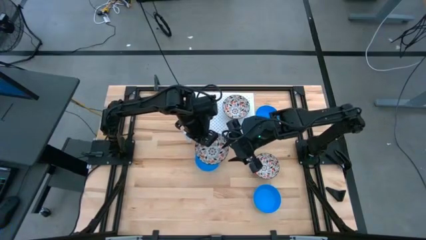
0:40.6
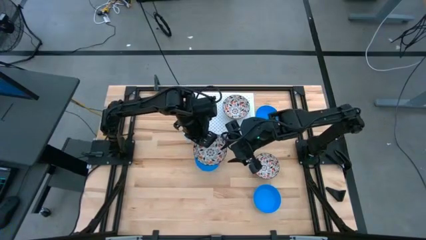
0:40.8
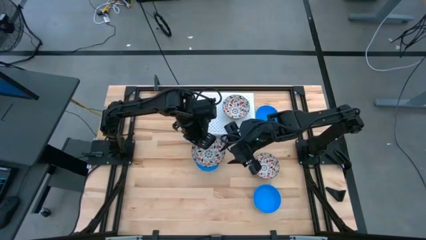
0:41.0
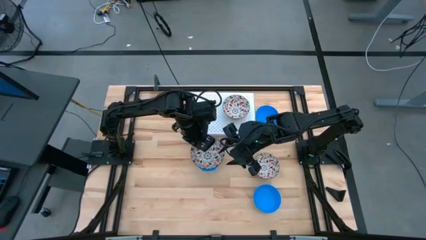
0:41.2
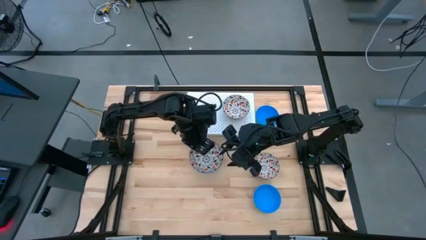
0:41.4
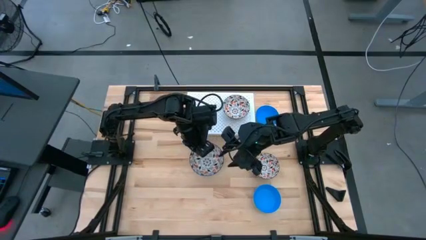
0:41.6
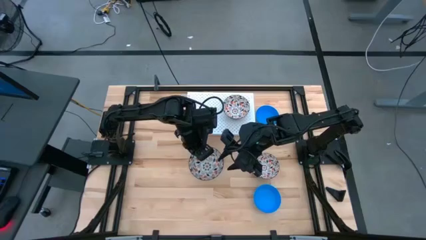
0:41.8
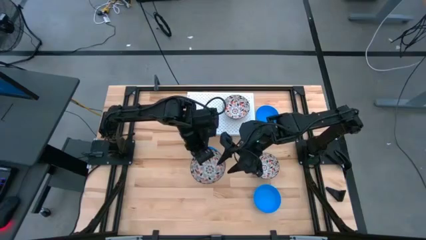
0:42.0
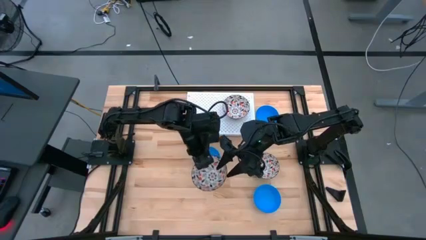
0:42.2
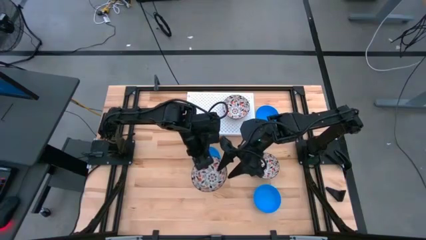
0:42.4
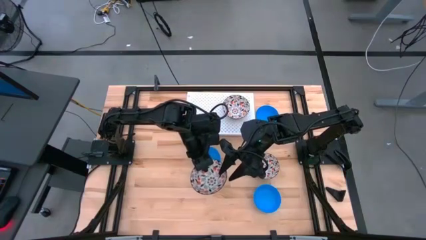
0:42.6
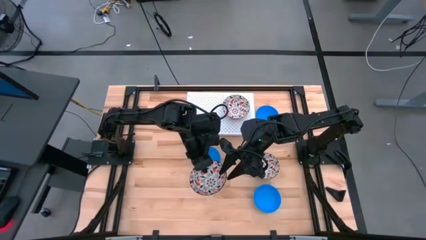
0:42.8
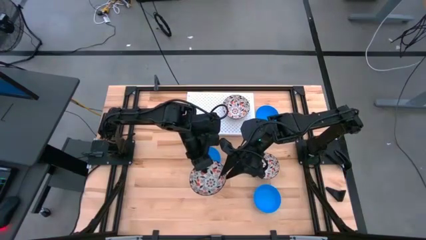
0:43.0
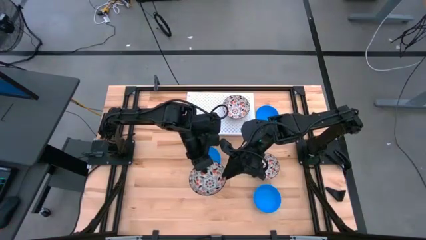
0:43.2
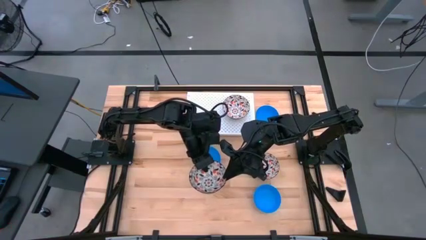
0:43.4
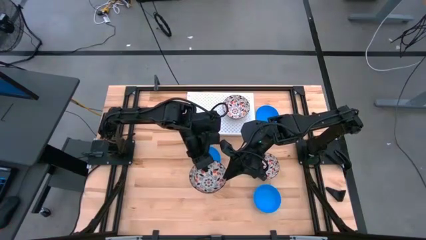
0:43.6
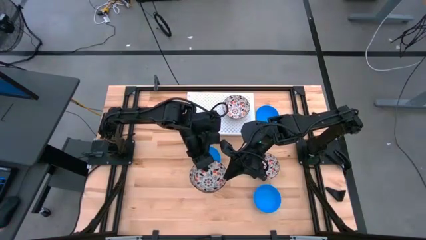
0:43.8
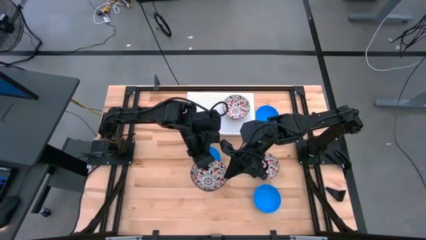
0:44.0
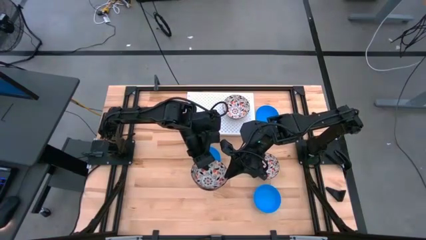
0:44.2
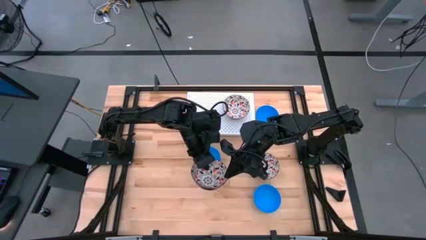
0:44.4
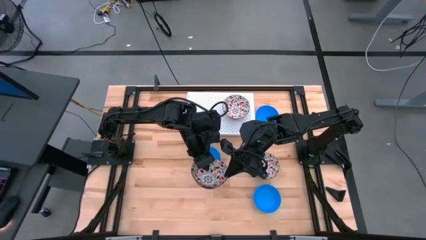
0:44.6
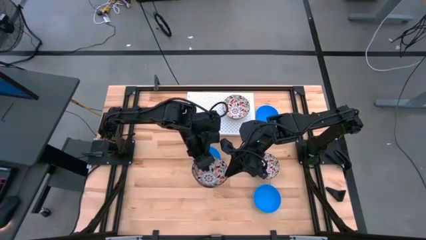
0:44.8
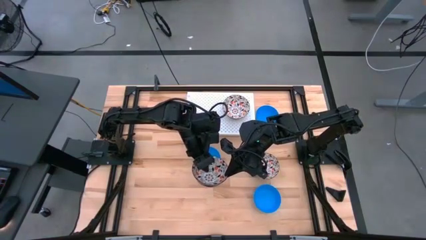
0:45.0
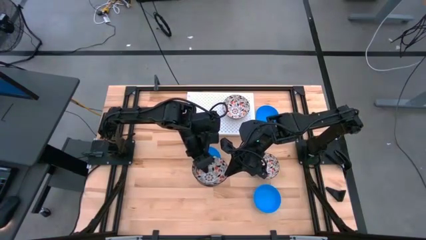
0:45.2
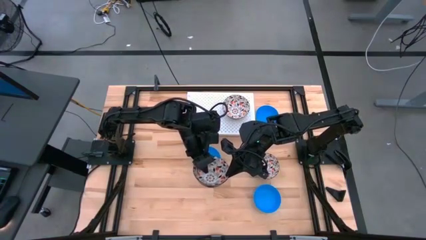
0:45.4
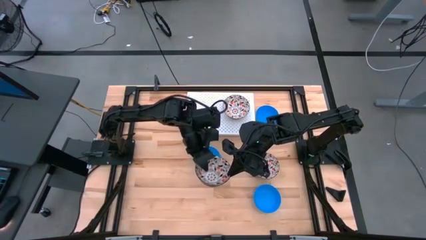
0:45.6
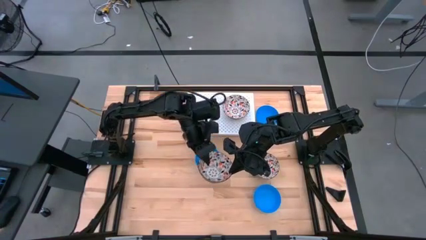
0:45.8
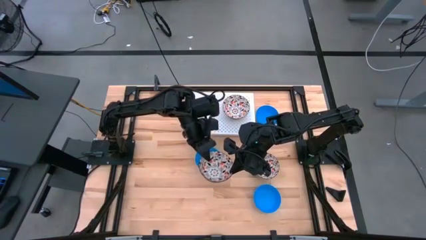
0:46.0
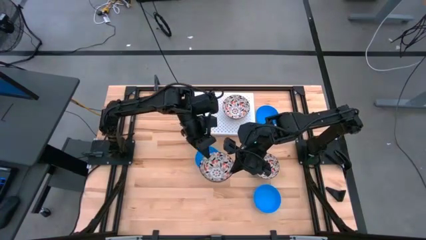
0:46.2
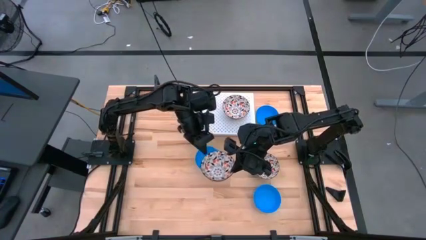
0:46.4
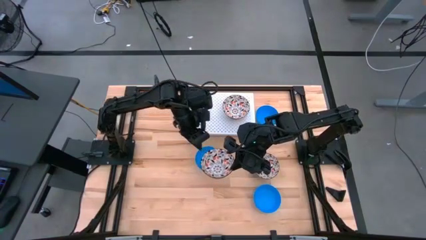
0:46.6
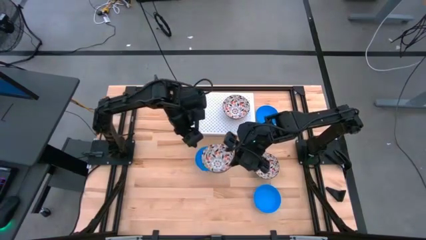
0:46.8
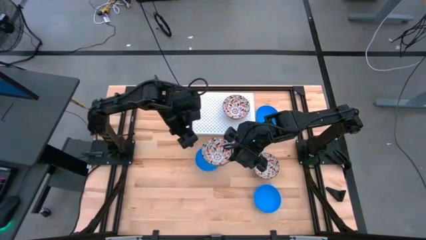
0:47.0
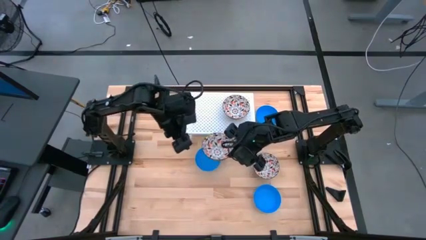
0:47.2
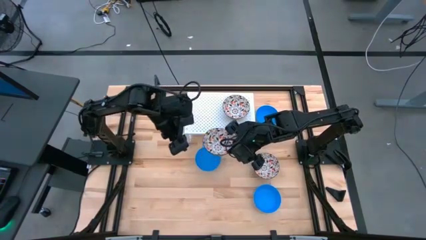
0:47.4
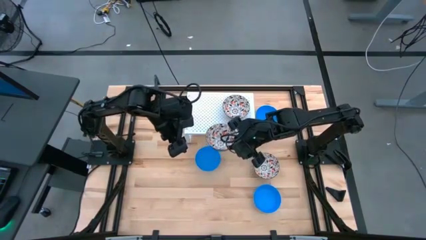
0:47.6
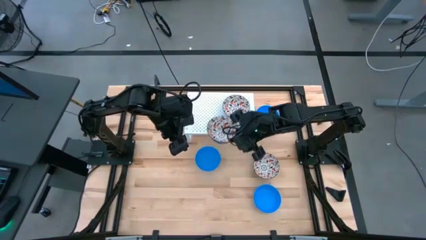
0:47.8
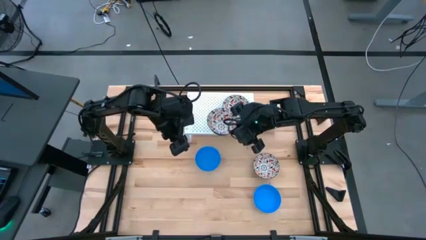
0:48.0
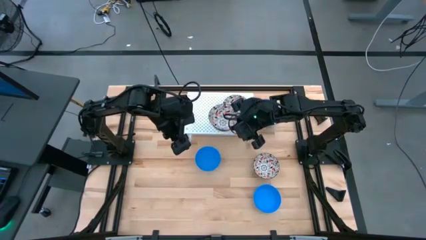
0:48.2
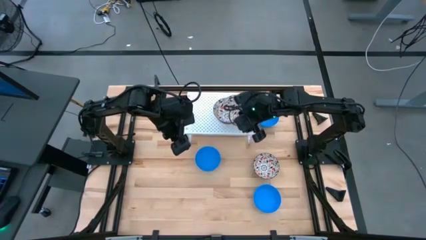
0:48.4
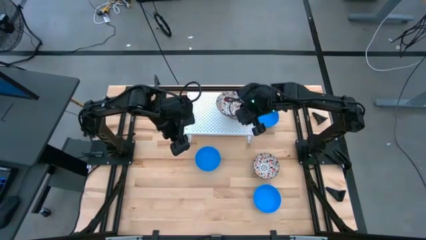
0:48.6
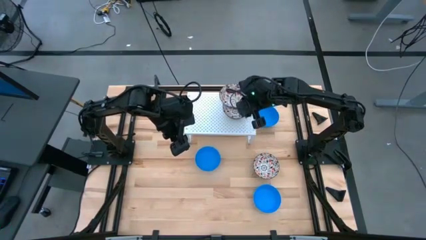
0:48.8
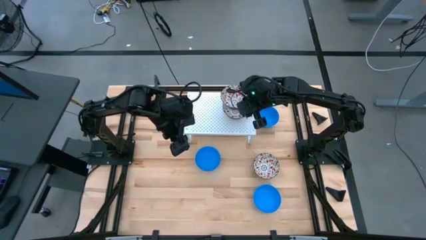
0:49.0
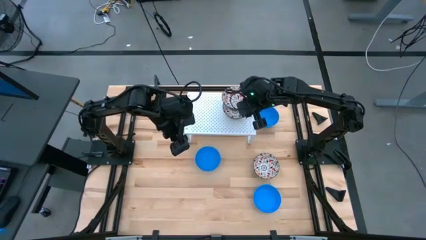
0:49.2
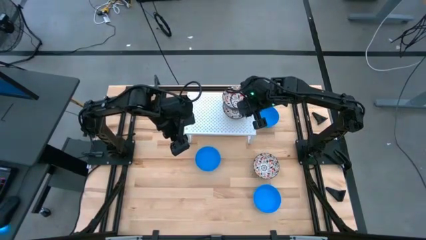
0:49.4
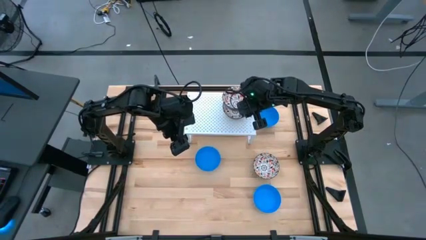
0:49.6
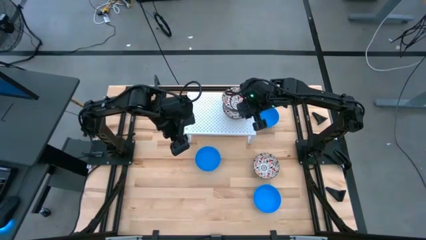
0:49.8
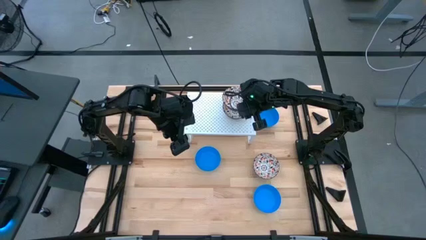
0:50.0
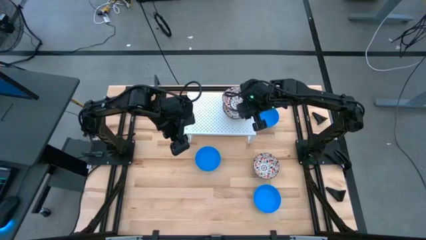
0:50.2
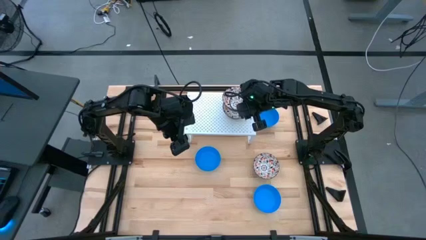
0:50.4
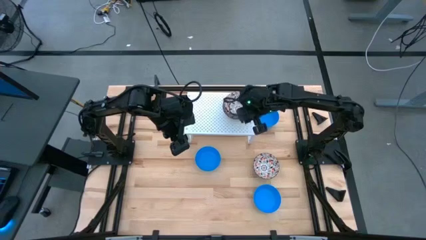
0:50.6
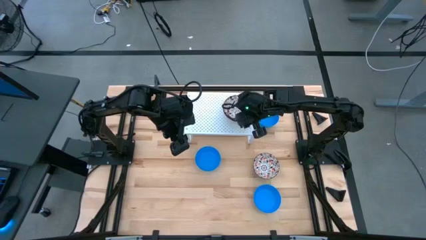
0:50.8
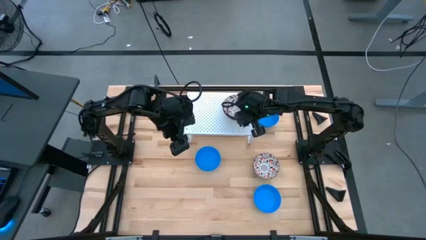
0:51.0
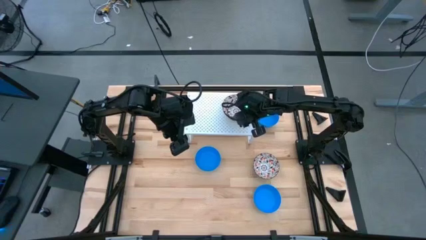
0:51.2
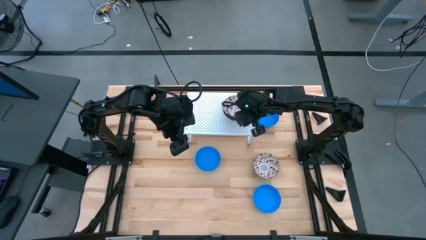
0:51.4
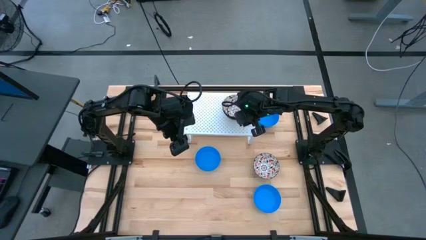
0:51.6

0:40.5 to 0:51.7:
Task: Pick & Place Mini bowls
Stack the left white patterned bowl on top of the other white patterned bowl on the shelf

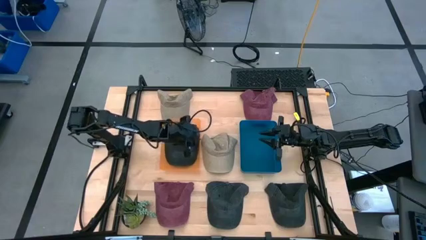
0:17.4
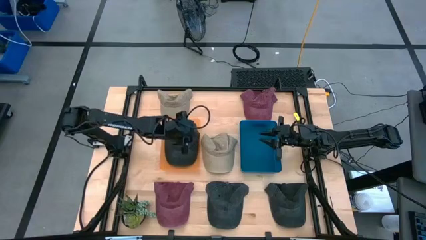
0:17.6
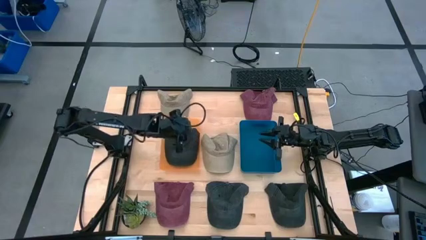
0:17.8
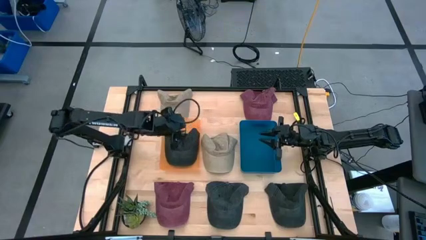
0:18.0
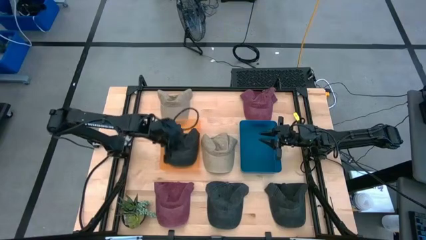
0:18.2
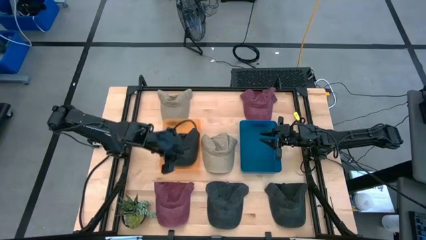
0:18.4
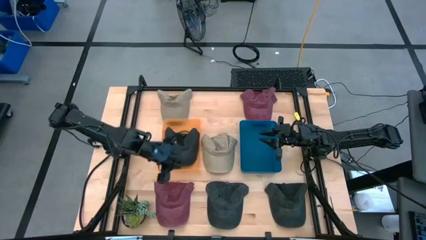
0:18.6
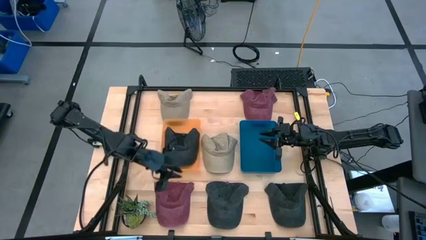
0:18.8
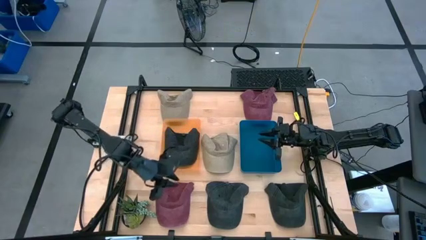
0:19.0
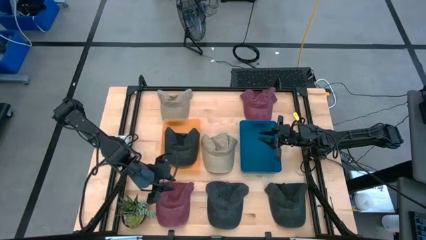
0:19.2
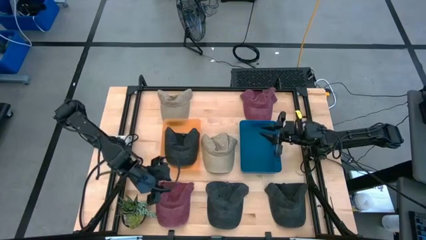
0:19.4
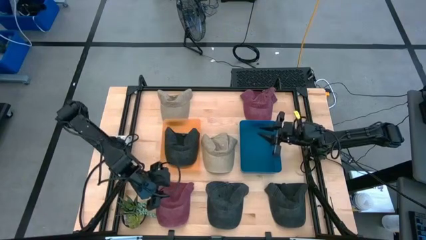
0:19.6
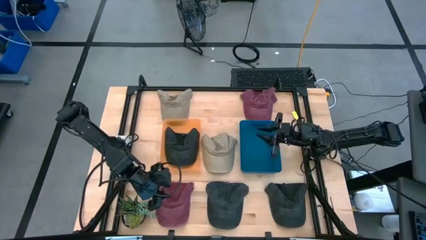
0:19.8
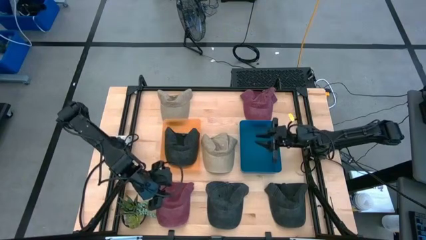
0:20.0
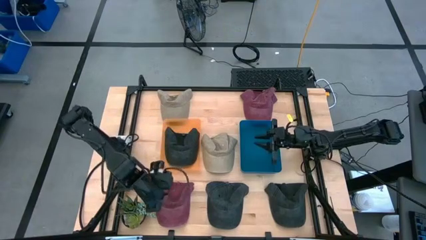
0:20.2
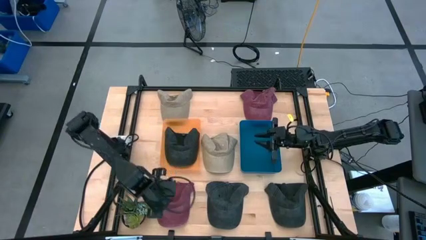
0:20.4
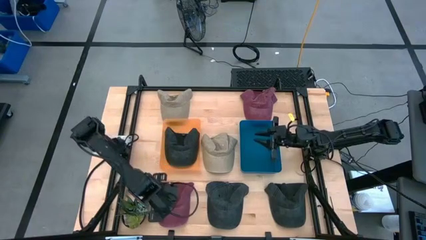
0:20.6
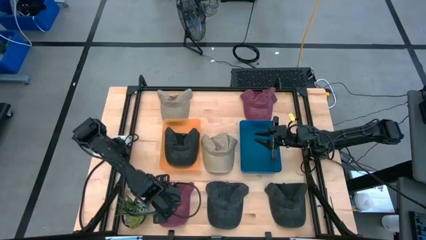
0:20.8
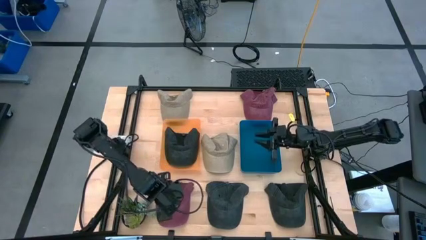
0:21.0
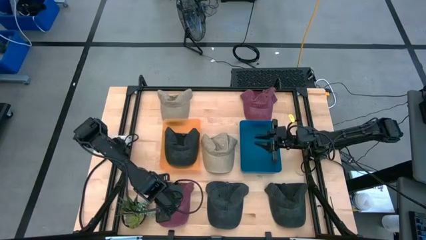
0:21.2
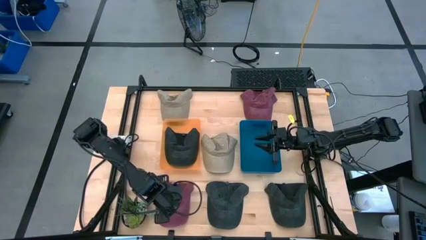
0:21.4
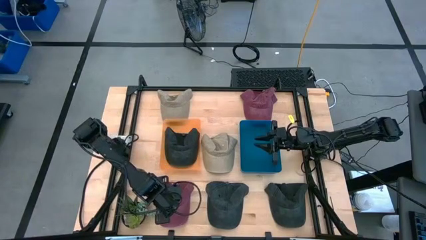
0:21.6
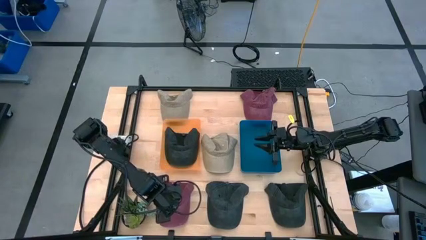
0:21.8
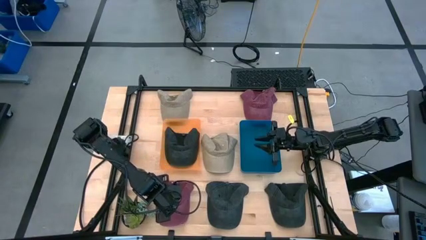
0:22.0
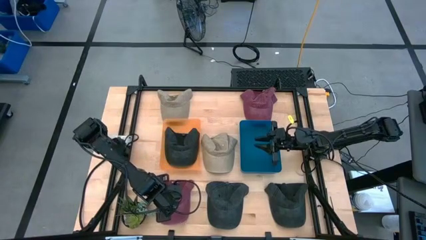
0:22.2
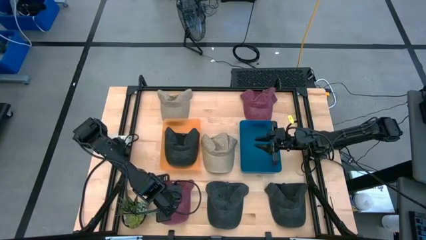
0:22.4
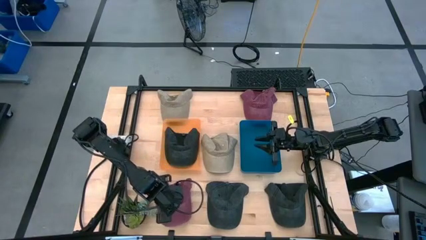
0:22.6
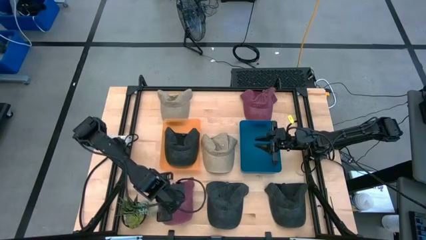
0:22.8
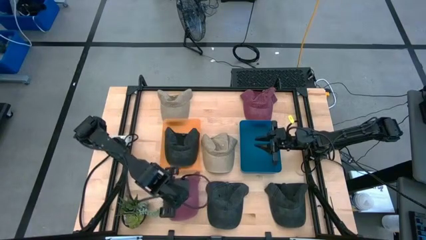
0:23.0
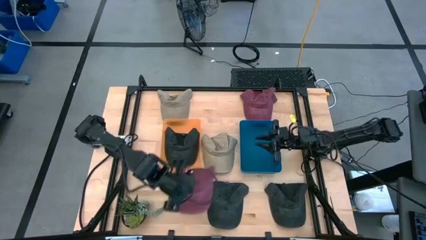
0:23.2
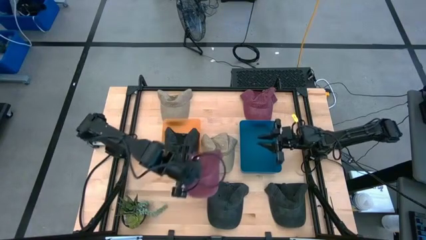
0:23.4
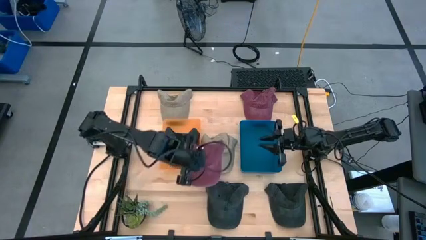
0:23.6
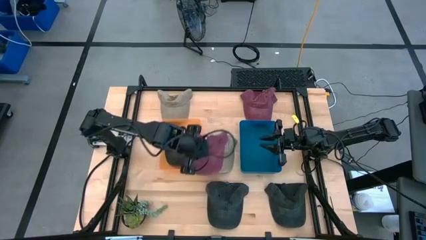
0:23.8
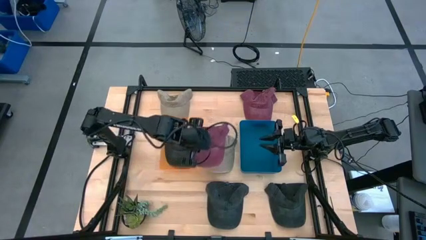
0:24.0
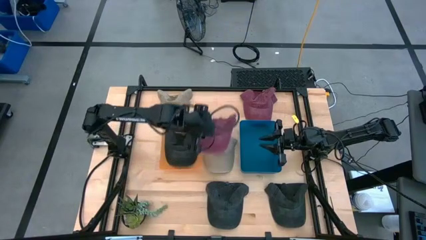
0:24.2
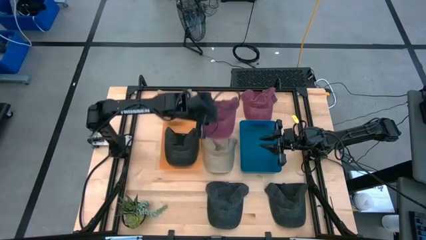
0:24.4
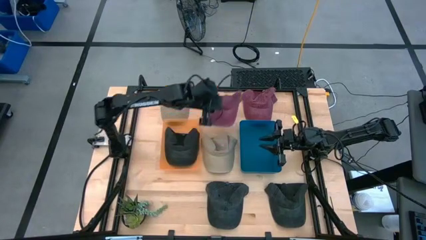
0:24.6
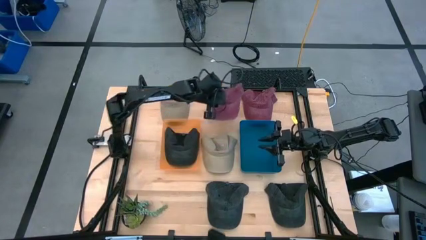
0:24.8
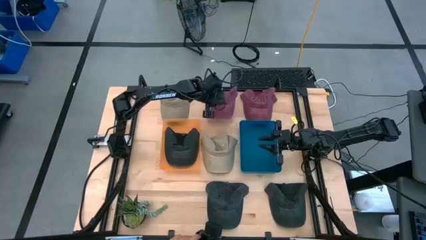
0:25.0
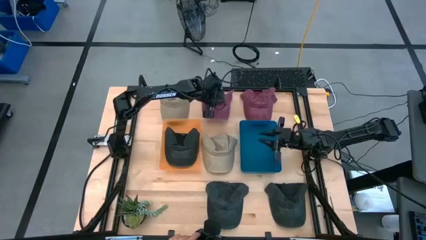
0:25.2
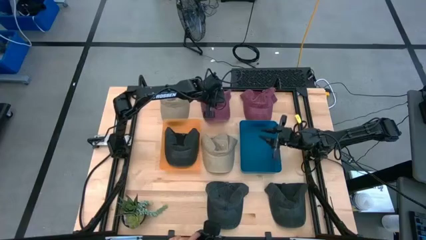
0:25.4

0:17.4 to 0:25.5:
Task: Pick & Place hat
Move the bottom red cap to the middle top of the table
